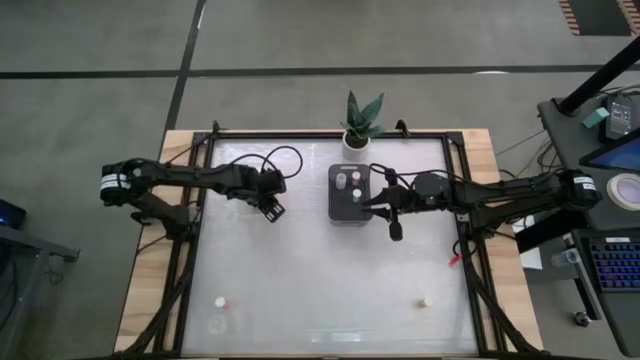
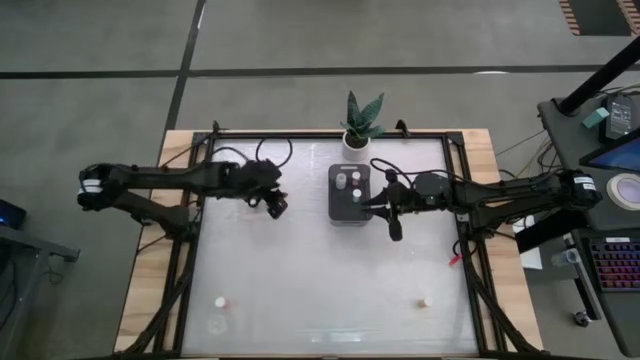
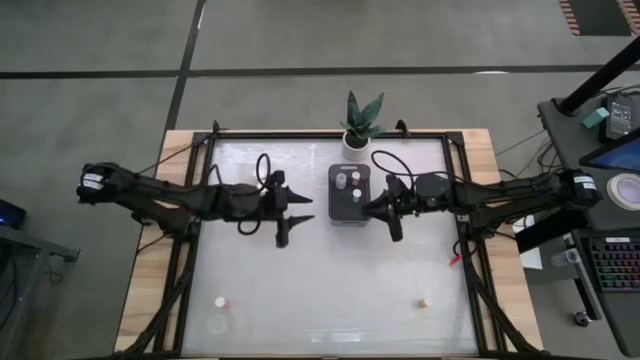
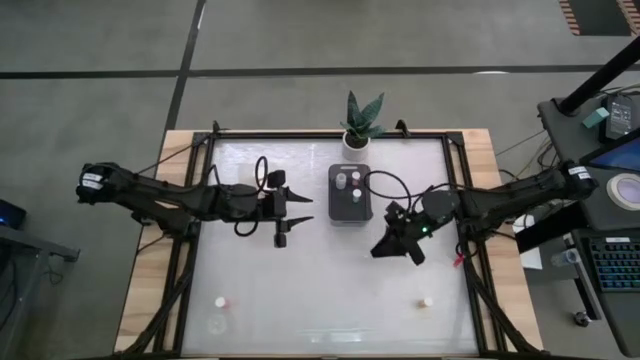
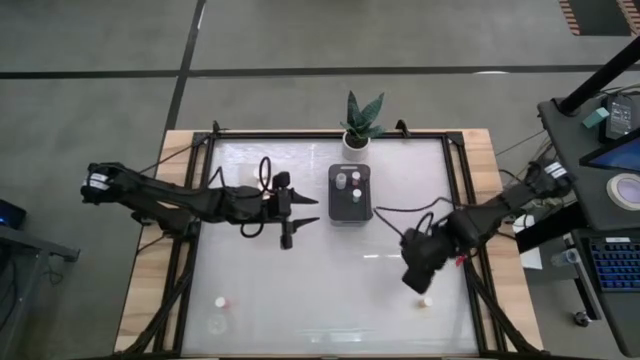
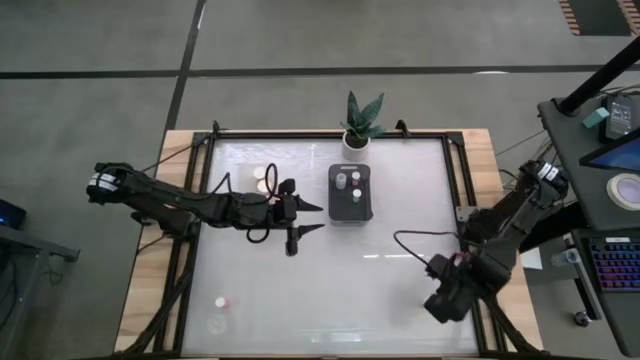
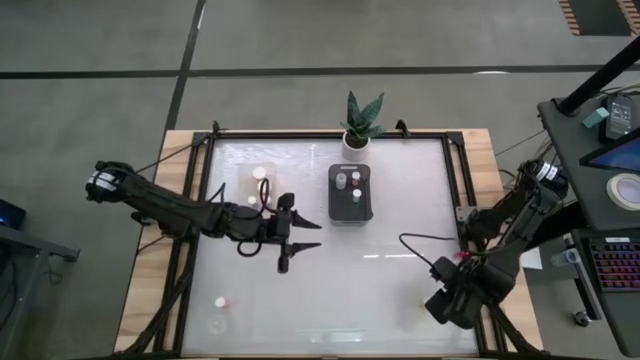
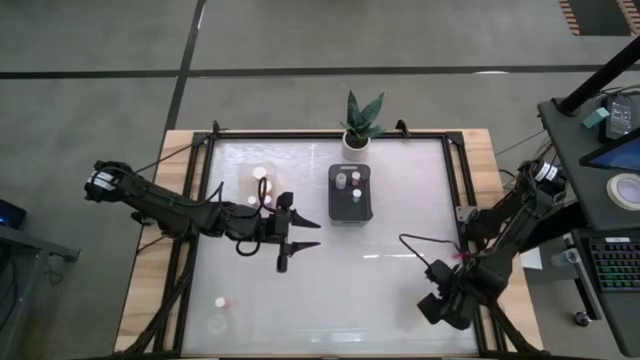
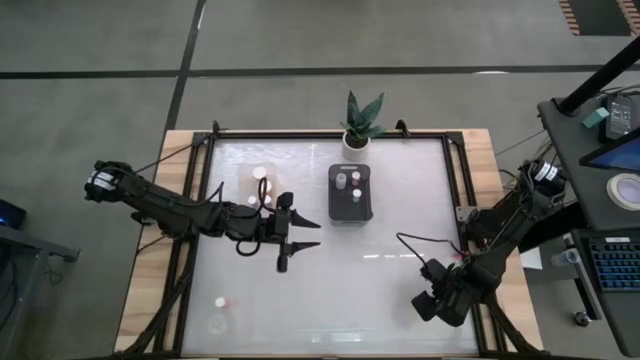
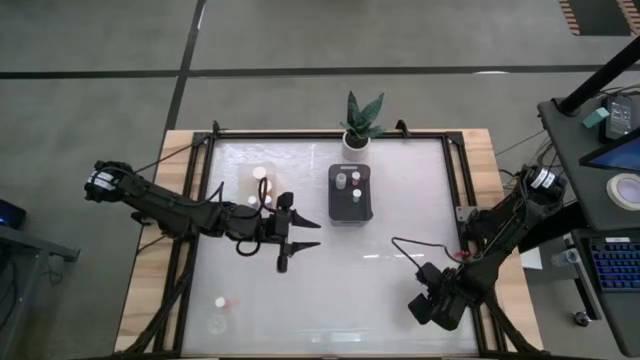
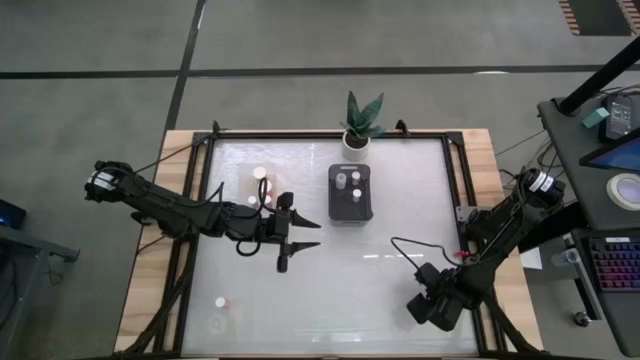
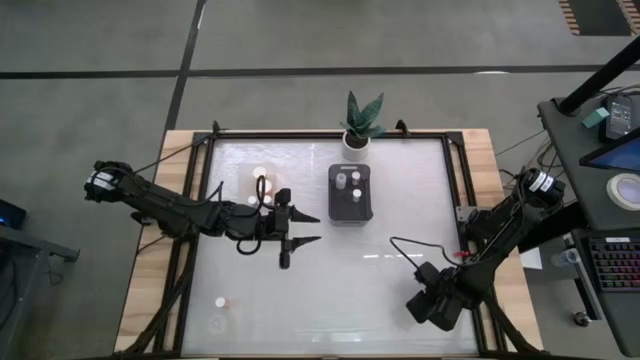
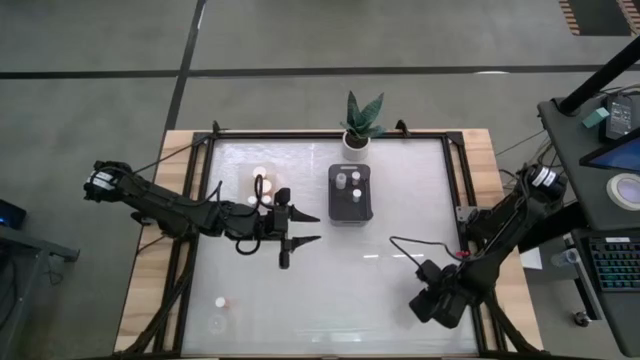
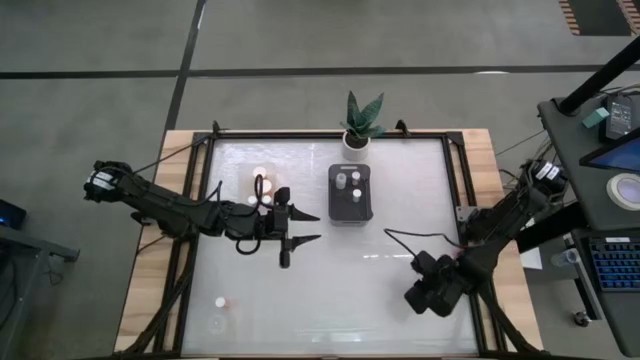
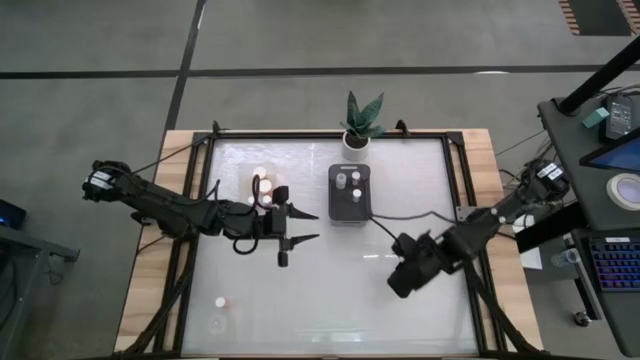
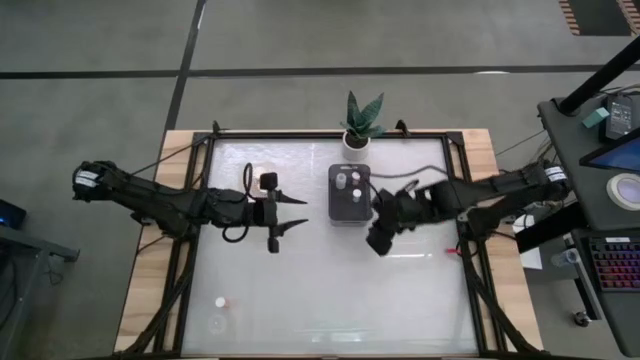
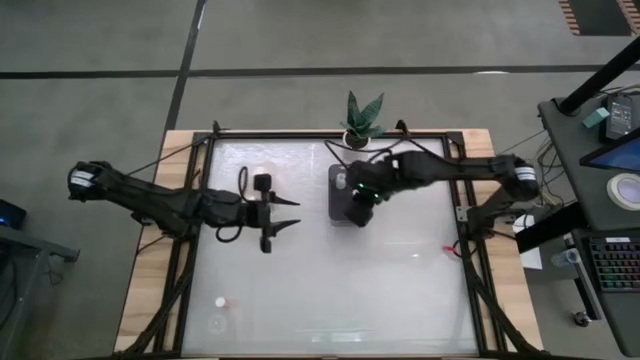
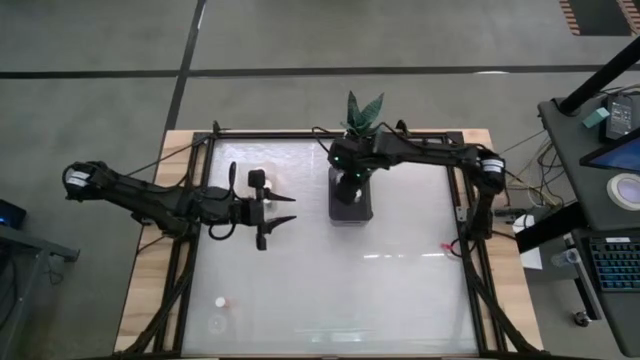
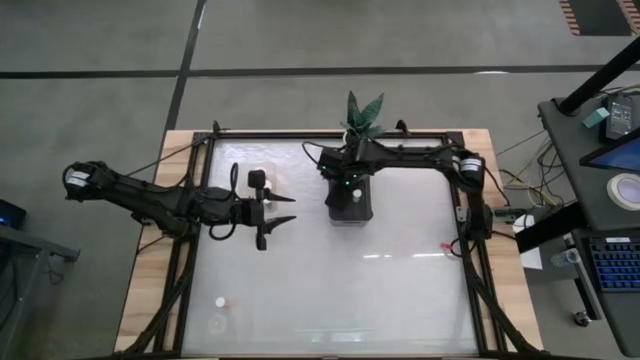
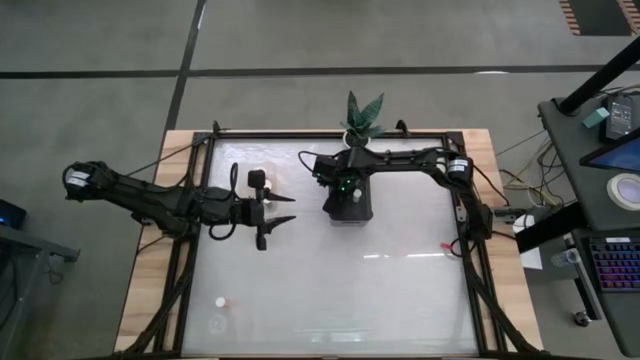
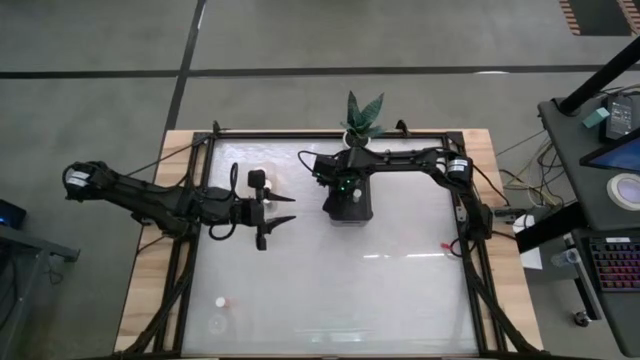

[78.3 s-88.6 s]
Task: Pick and place medicine bottles into bin by pill shape (circle, oval)
Put the small yellow pill bottle into the black bin

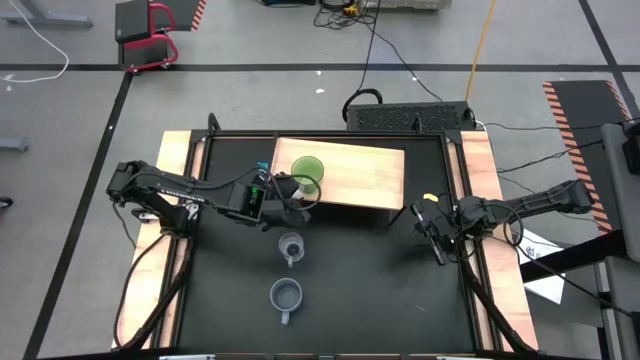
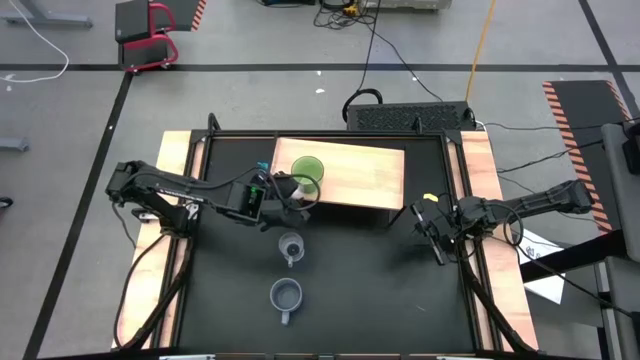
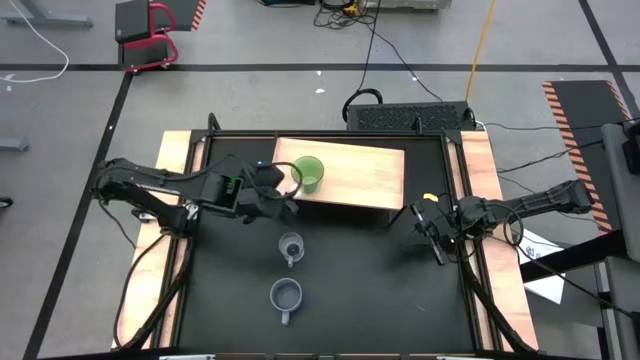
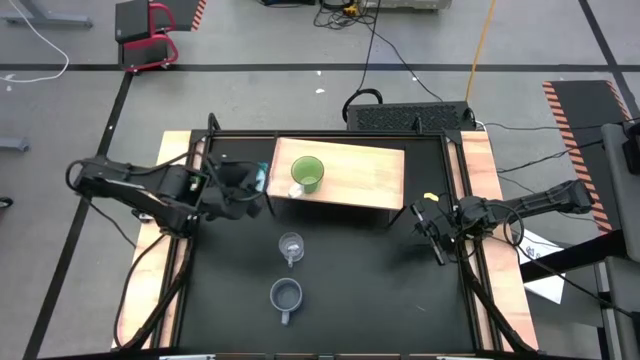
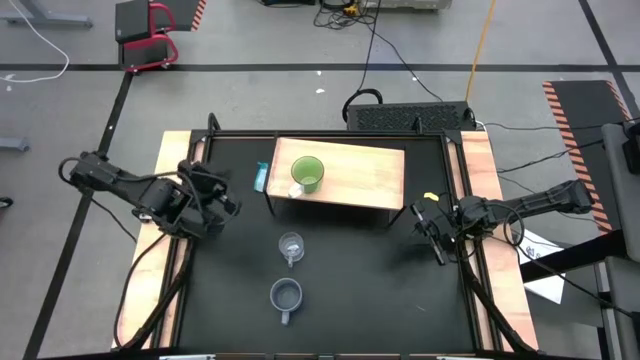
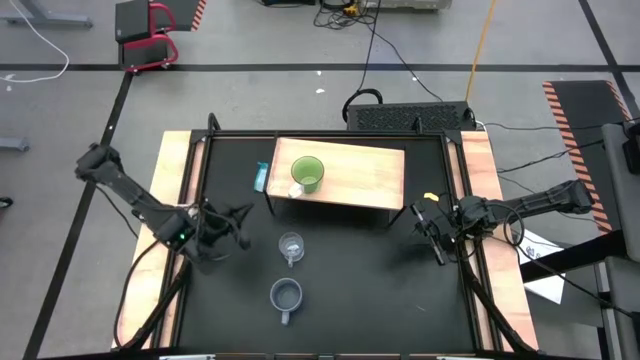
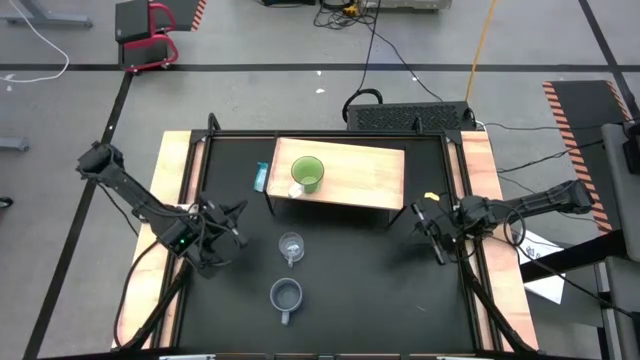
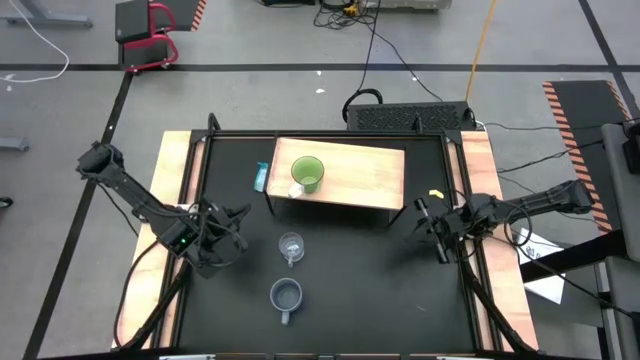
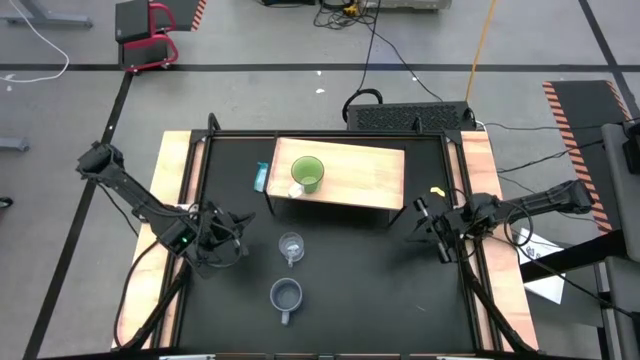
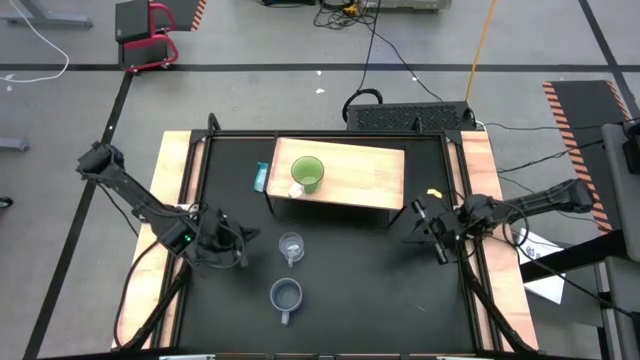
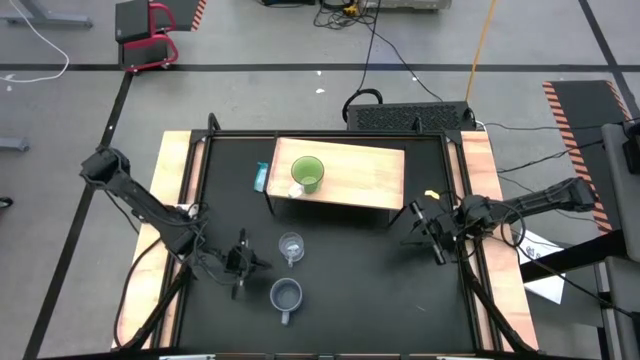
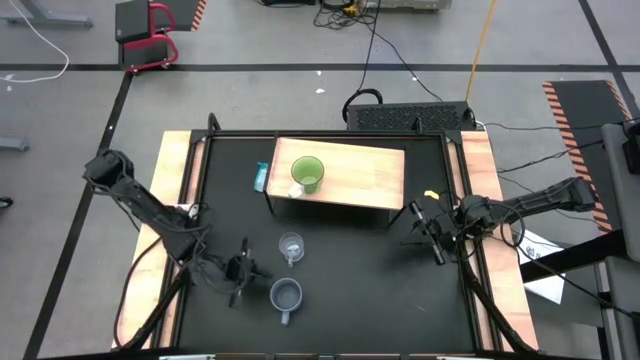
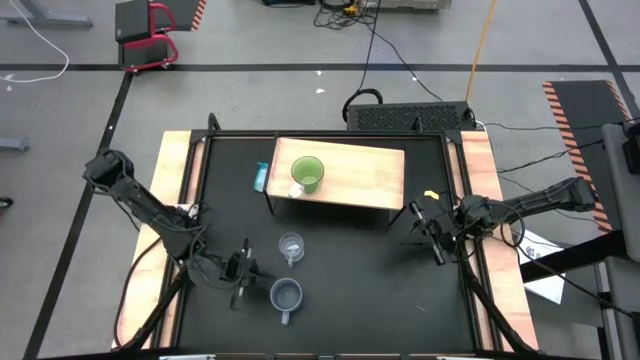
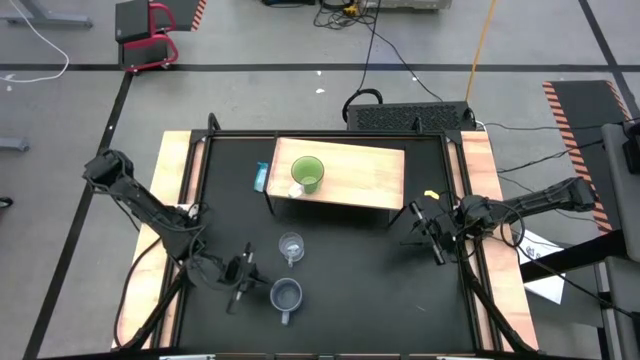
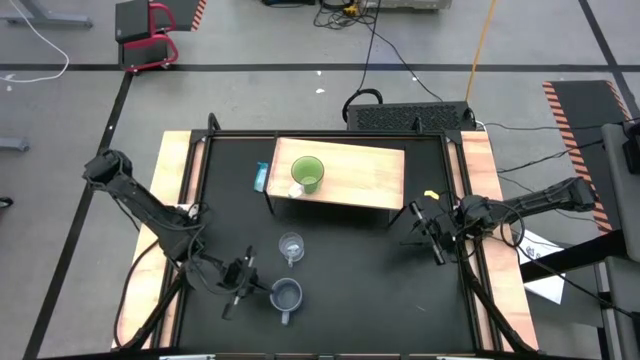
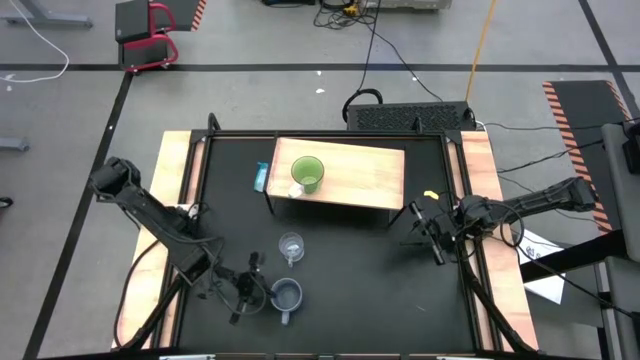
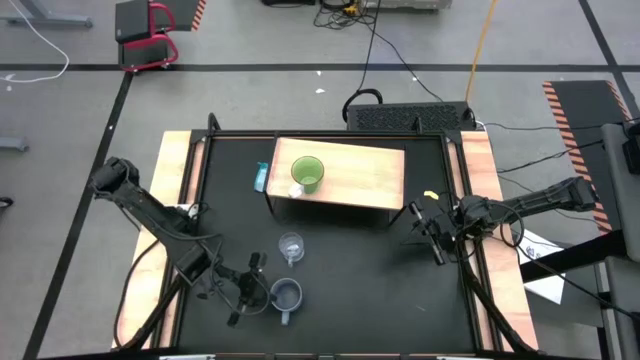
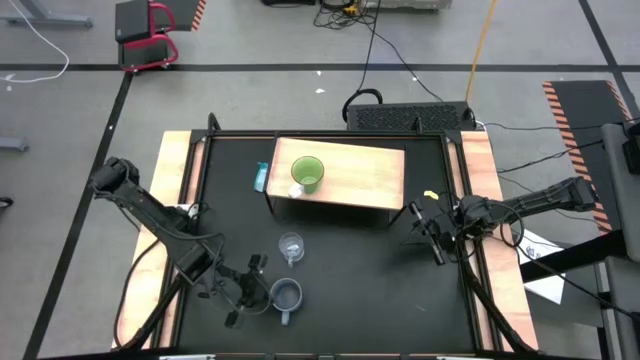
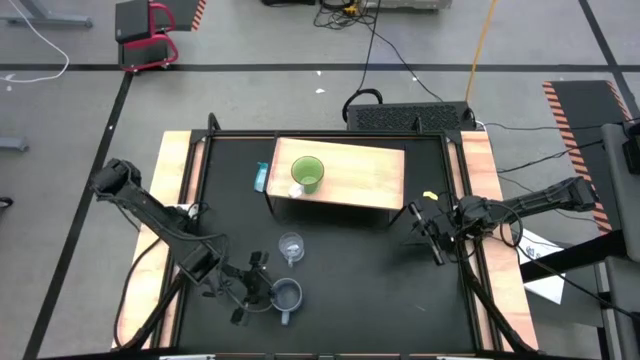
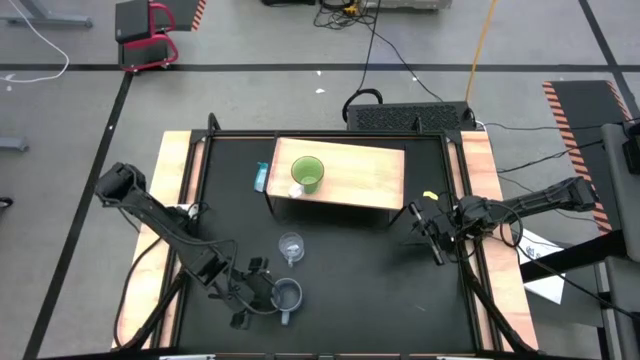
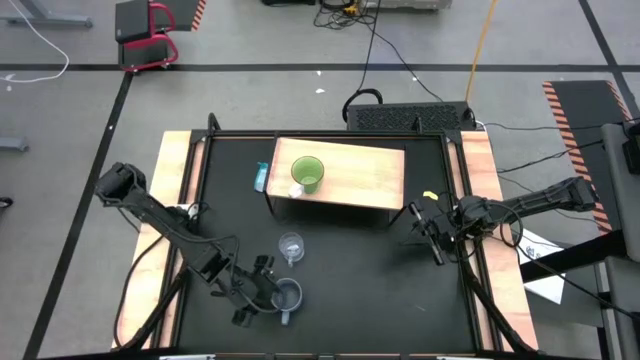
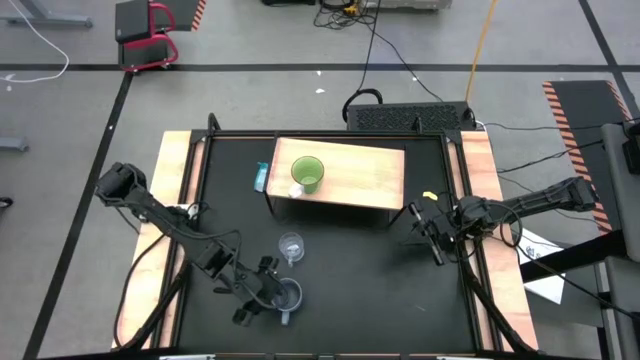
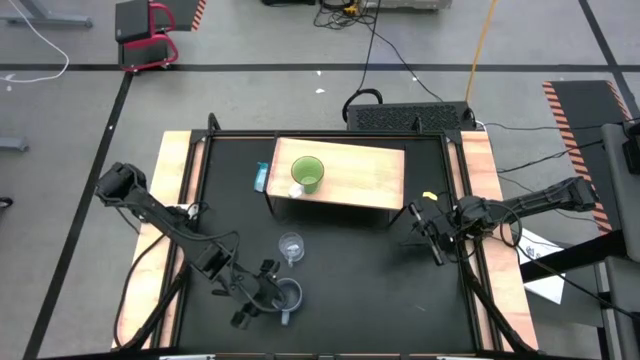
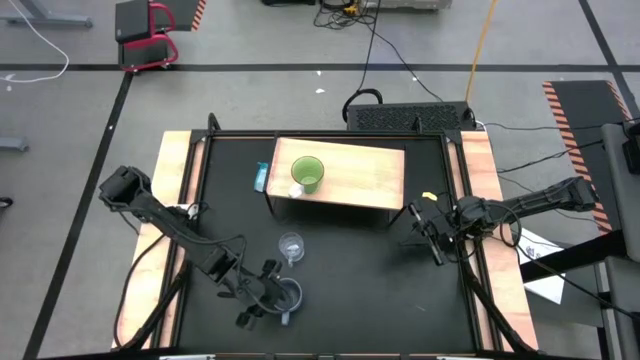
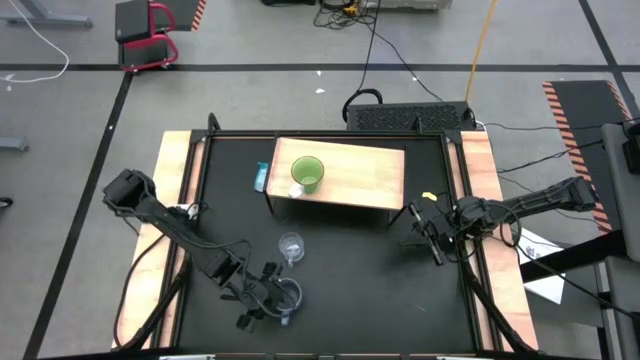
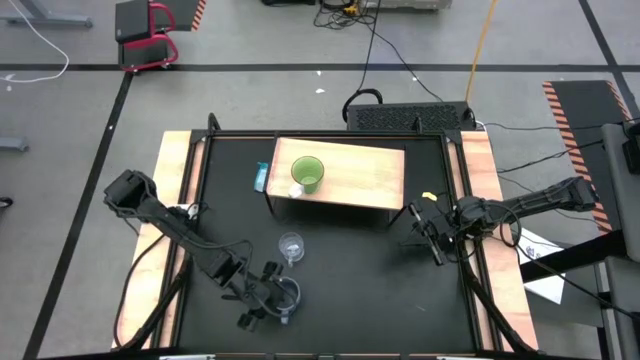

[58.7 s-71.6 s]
Task: Stack small to large cups/mugs on shelf
Put the gray cup on the shelf
